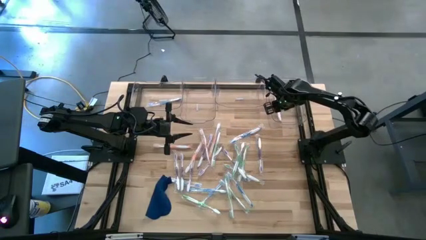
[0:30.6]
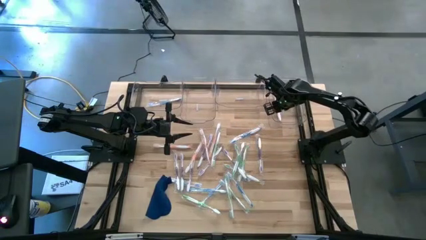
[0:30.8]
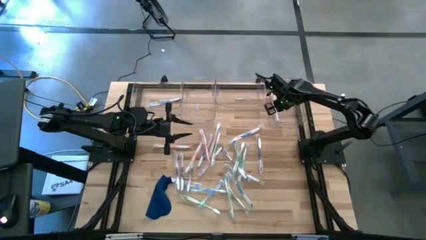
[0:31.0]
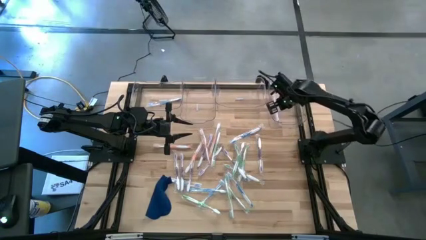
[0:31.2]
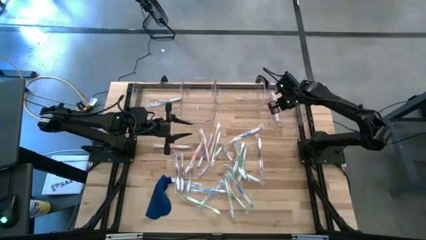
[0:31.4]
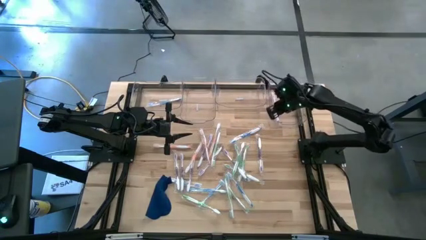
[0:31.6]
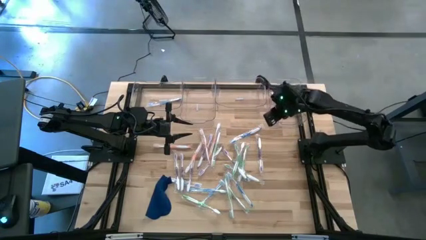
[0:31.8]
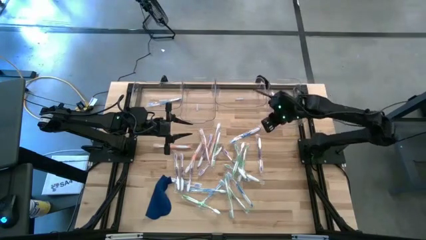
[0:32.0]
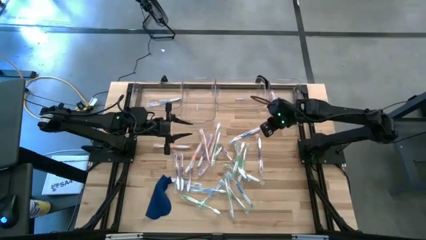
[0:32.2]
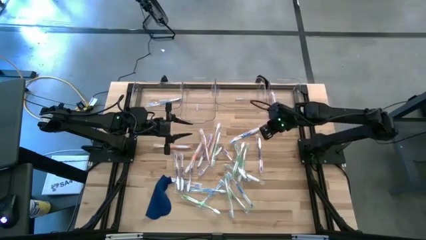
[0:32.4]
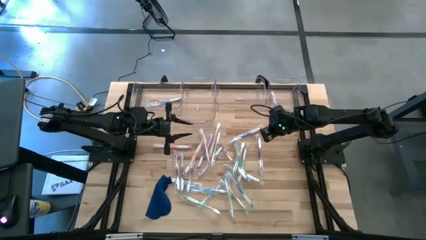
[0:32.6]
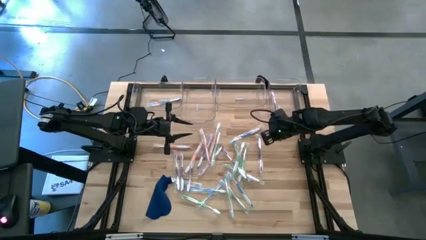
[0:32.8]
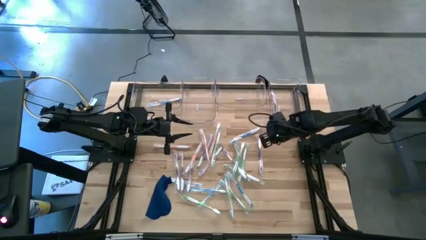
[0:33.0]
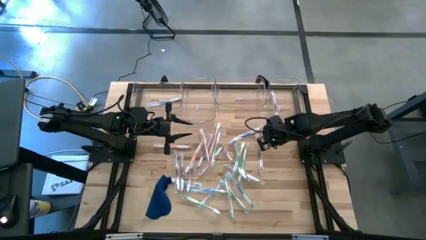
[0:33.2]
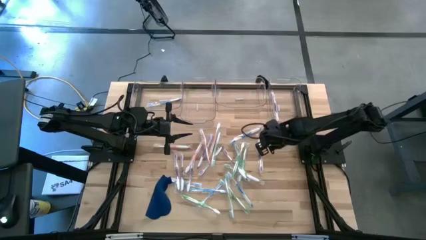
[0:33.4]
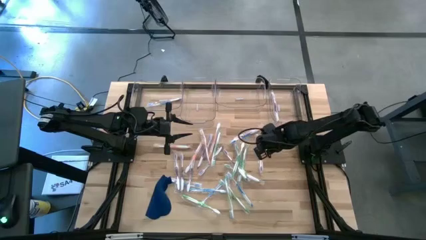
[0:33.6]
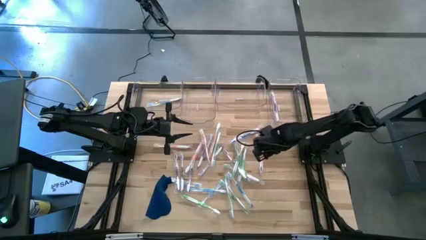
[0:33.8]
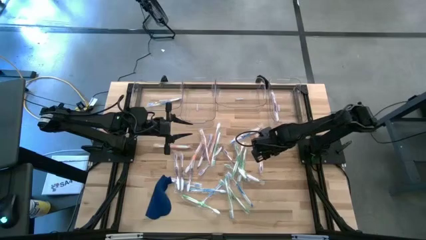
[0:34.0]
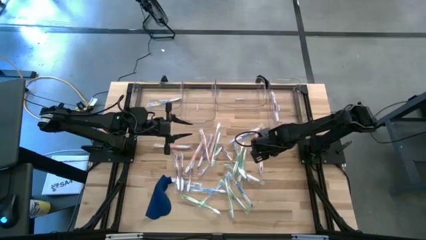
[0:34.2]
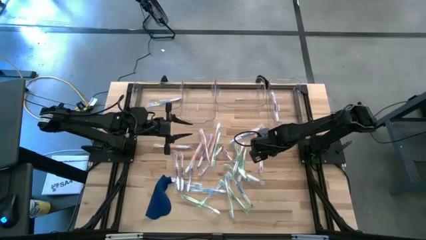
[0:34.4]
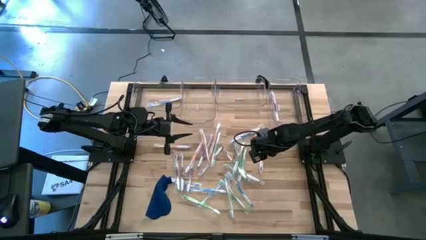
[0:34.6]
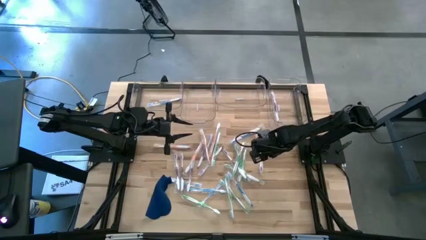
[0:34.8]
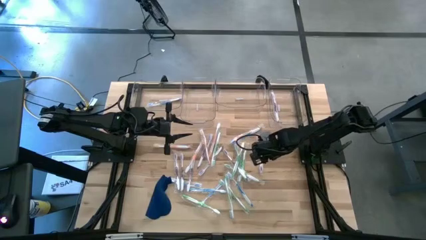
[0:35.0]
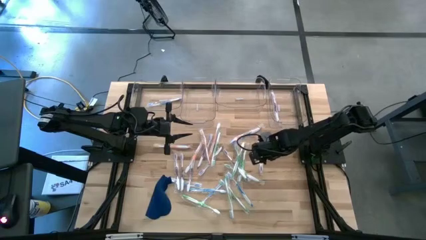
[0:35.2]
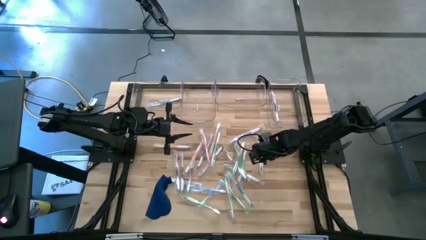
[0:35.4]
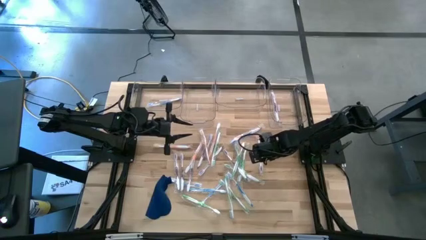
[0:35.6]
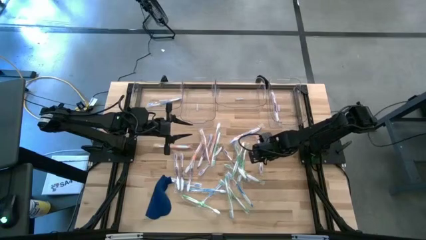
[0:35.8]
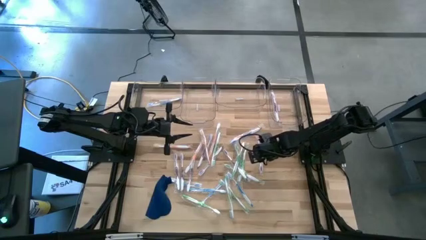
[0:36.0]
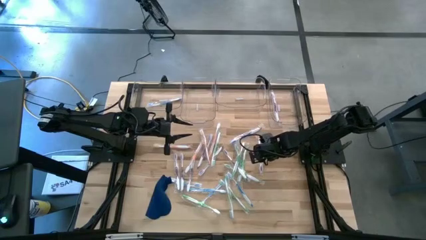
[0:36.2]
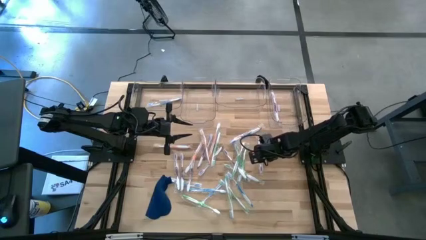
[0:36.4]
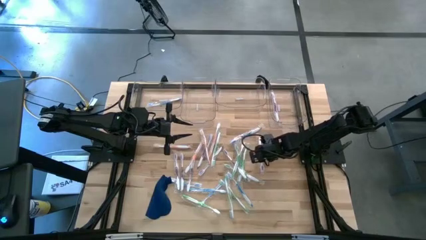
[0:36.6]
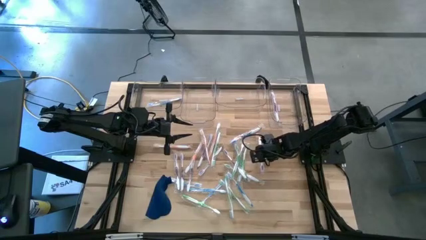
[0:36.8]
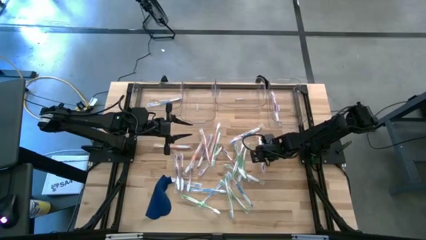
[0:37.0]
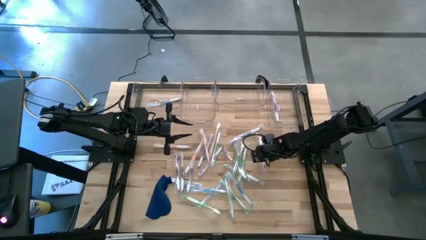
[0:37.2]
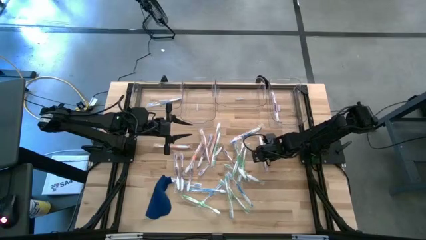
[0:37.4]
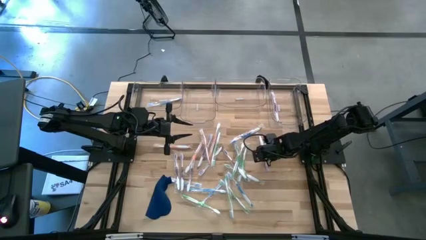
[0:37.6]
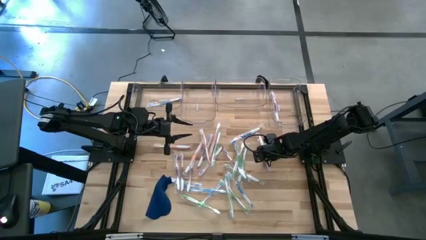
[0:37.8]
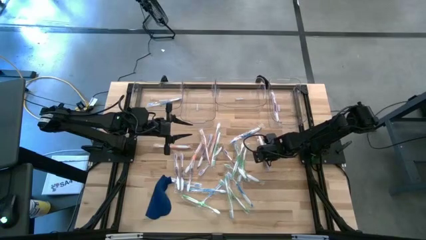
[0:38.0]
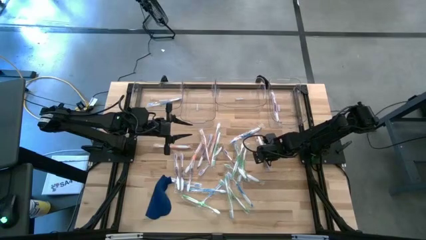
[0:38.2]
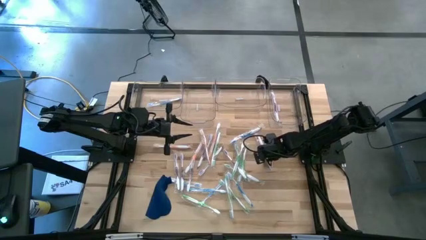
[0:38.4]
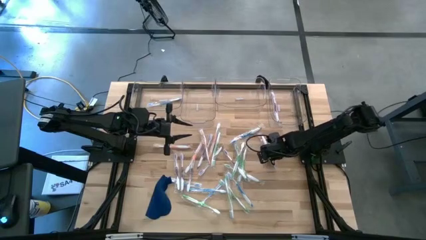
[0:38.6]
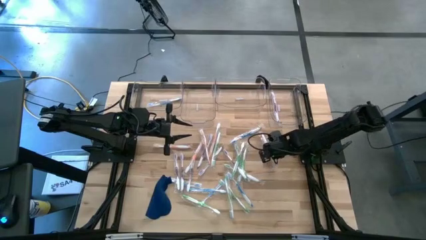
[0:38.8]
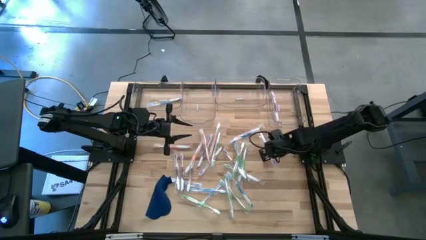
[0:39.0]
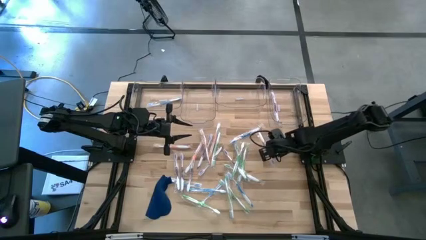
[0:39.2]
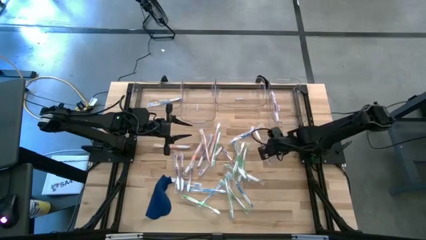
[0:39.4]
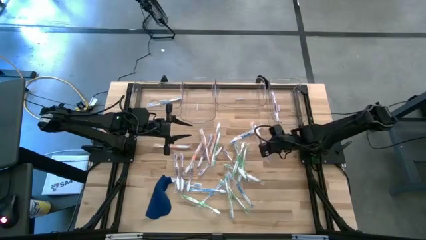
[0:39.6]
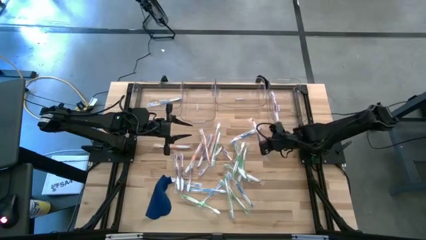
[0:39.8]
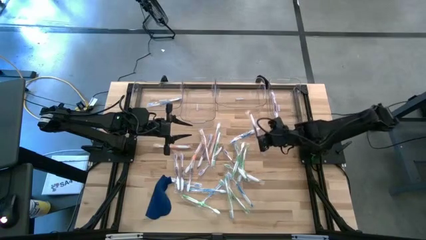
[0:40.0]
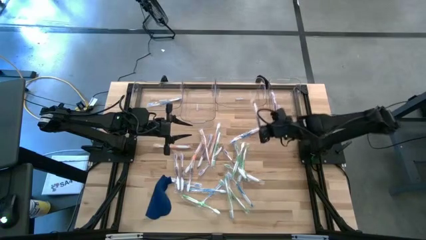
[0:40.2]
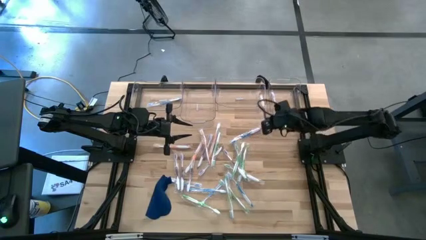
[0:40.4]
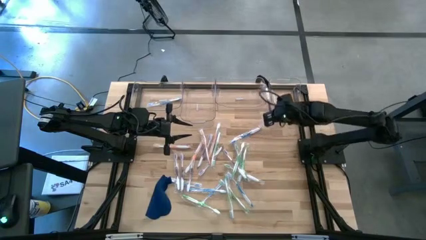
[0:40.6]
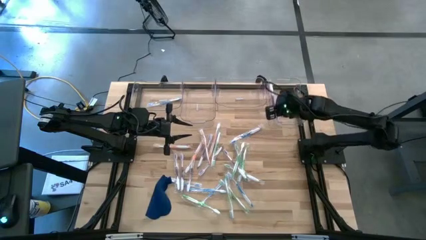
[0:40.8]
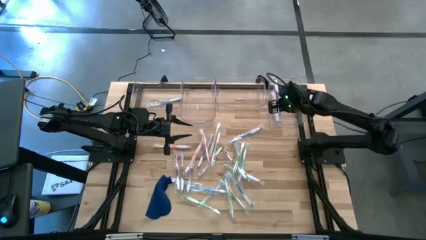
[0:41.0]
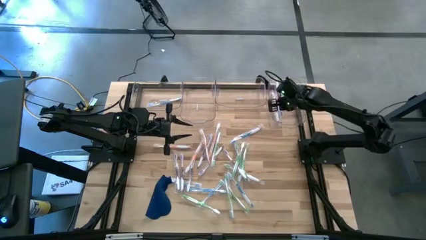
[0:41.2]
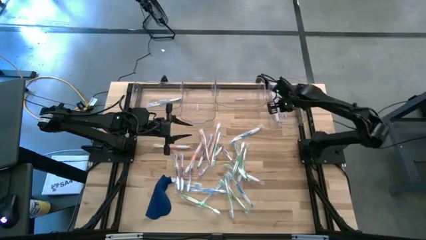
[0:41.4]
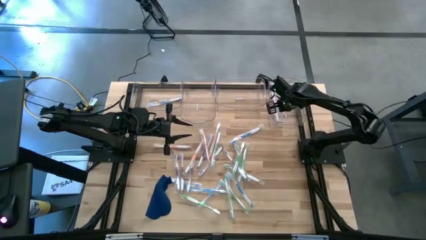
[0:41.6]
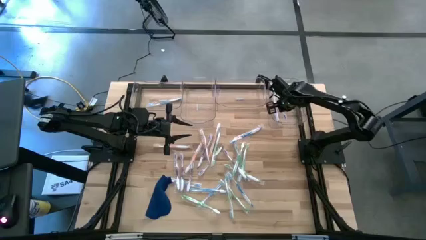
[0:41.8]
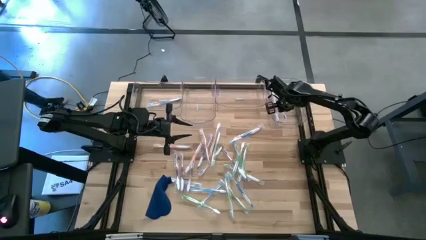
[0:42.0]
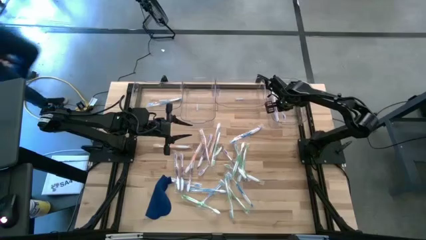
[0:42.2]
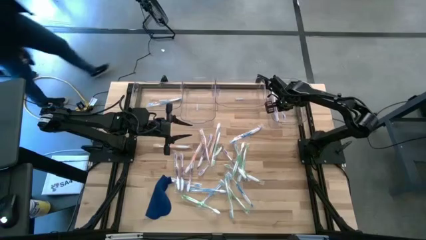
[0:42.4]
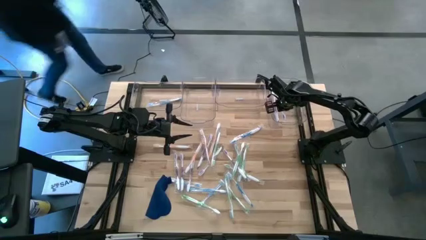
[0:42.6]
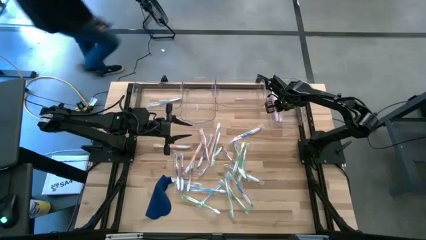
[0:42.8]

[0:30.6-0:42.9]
Task: Pick & Place Toothbrushes
Put the purple toothbrush into the right transparent bin

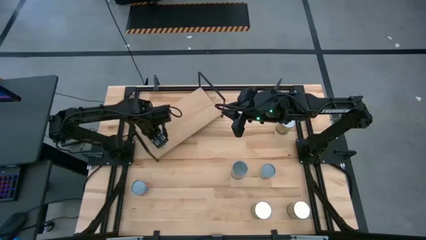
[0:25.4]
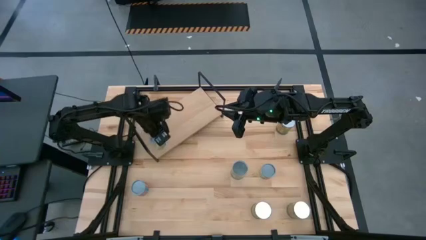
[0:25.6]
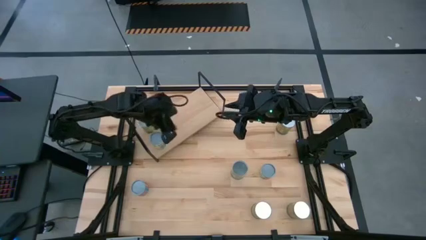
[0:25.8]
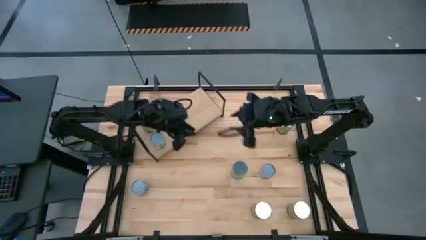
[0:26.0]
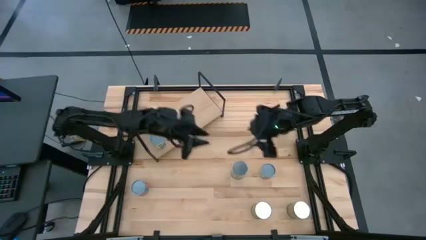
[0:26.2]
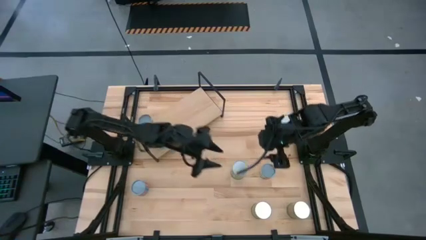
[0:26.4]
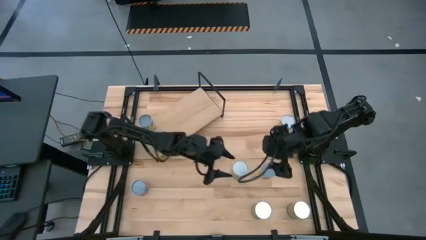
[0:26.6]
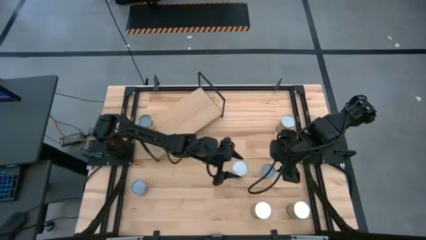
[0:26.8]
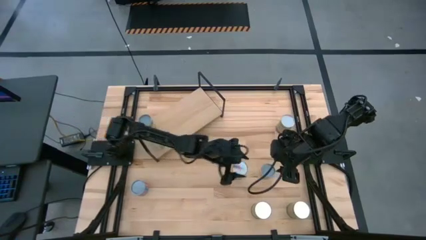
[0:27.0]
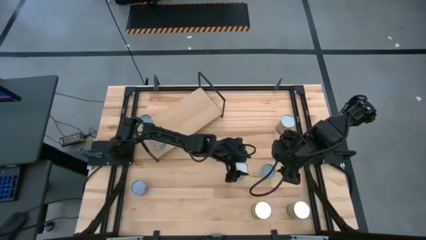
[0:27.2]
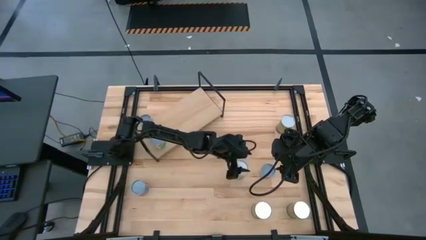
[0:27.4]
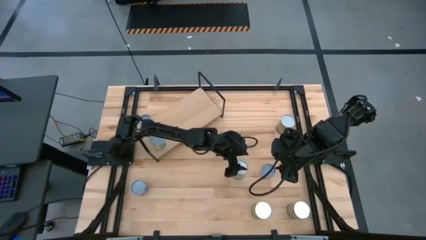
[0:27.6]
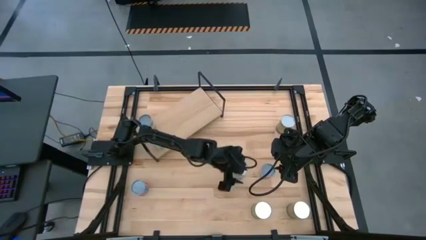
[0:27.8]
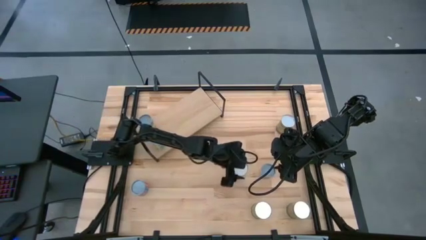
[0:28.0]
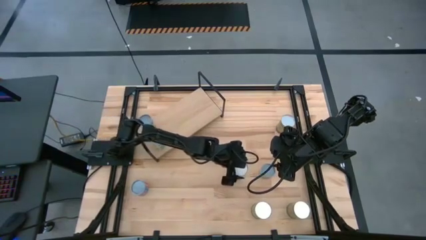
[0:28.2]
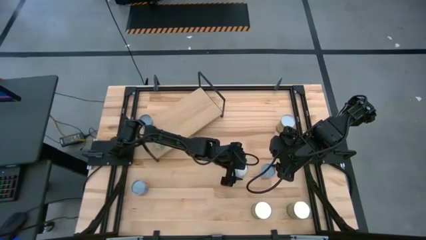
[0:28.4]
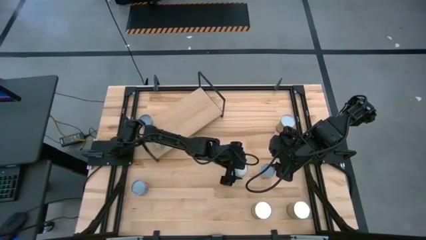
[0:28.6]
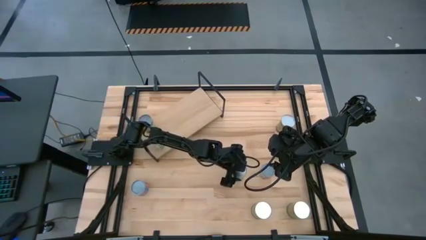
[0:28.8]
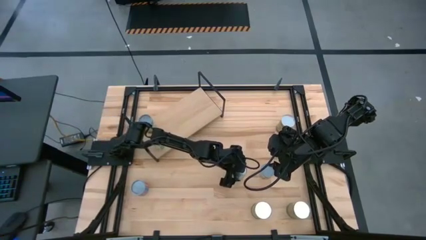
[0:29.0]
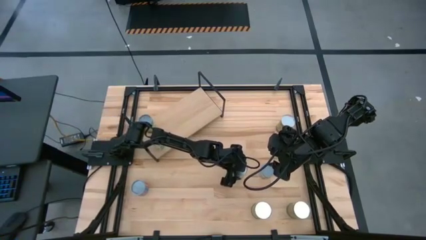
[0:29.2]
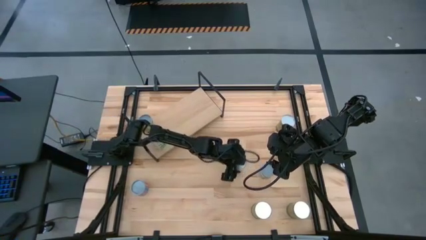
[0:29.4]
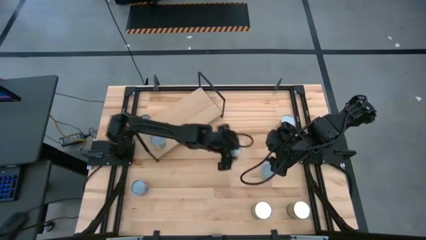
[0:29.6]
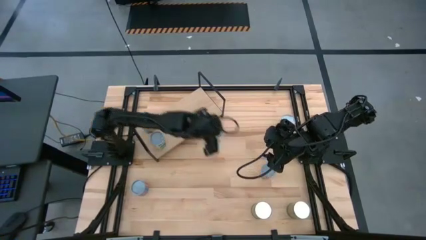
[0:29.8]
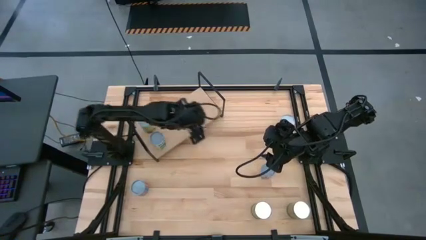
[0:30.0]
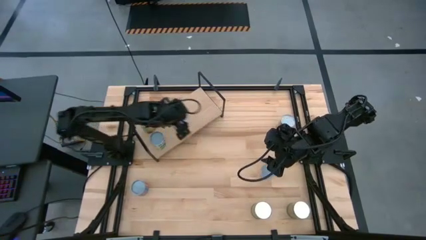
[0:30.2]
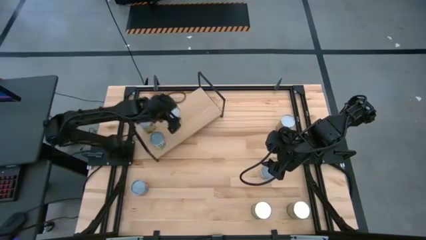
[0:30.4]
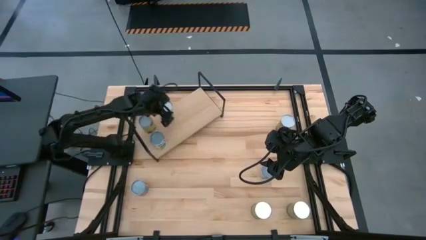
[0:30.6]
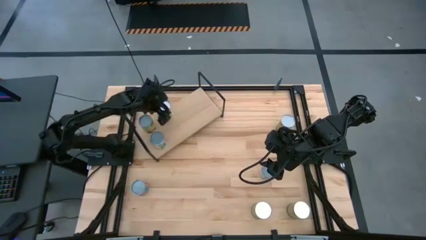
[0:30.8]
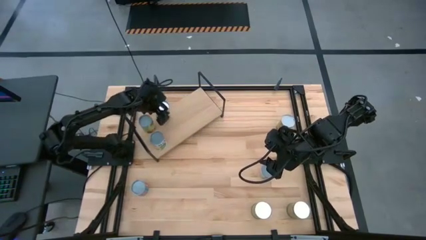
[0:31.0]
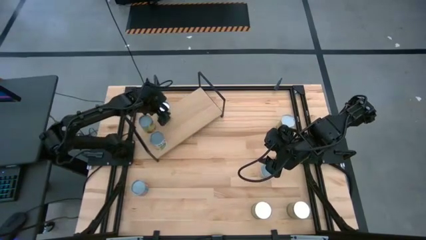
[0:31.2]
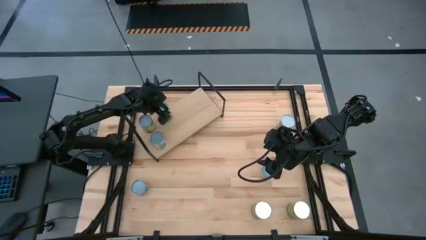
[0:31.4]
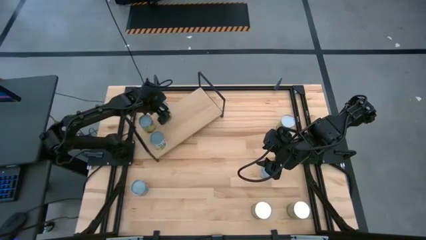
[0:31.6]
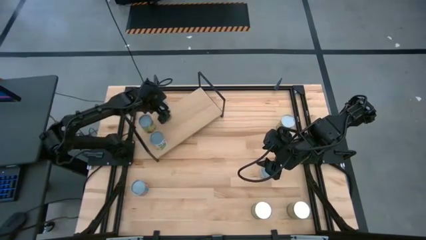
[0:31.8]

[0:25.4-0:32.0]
Task: Pick and place cans onto a shelf
Put the top canned pears on the shelf
